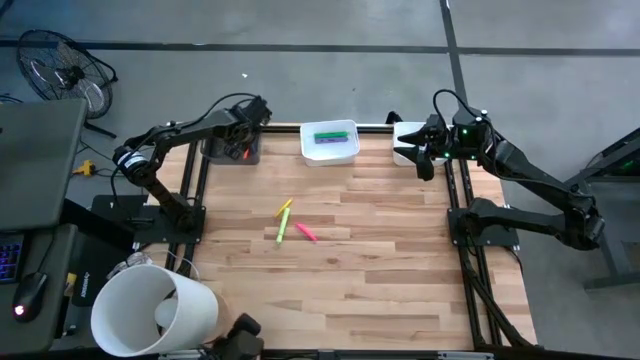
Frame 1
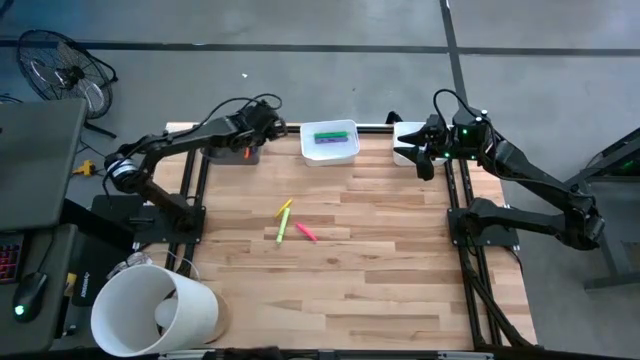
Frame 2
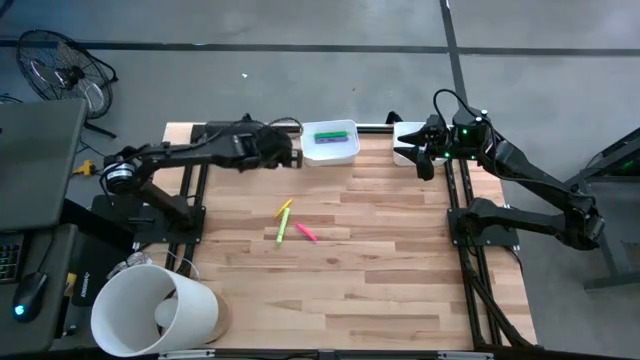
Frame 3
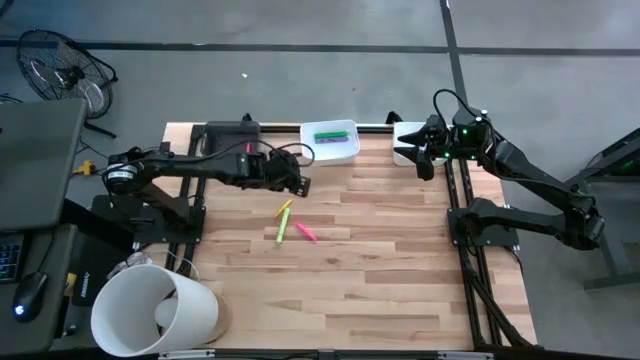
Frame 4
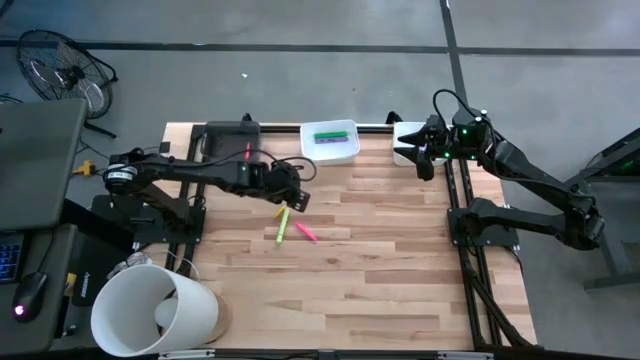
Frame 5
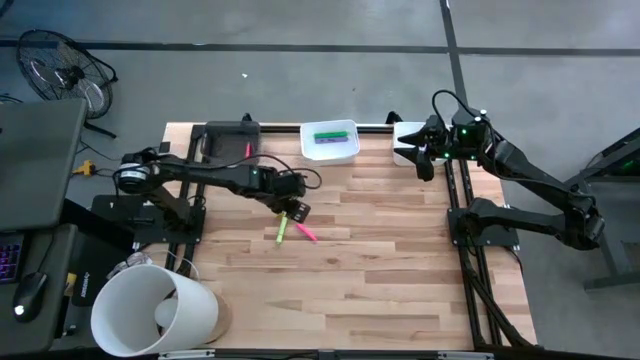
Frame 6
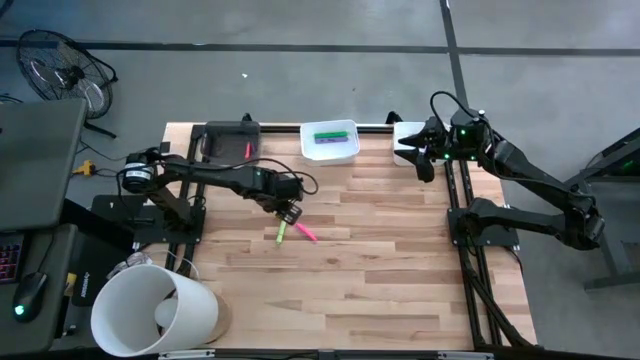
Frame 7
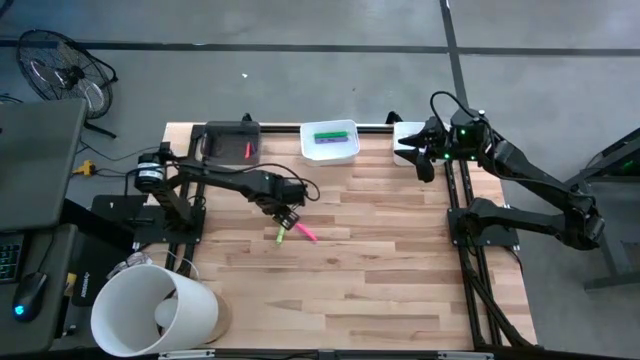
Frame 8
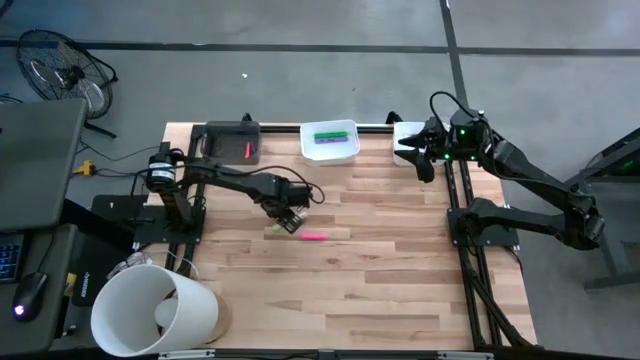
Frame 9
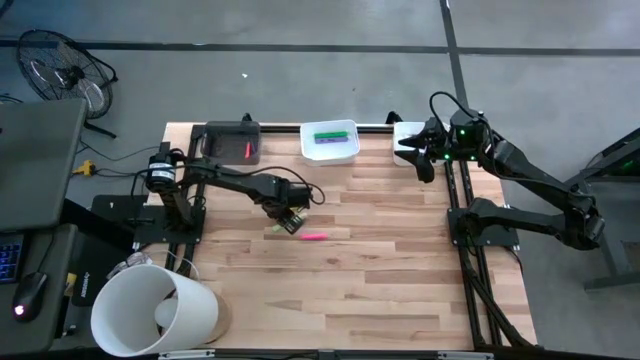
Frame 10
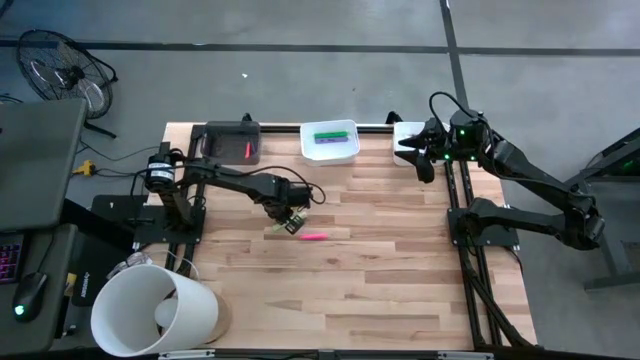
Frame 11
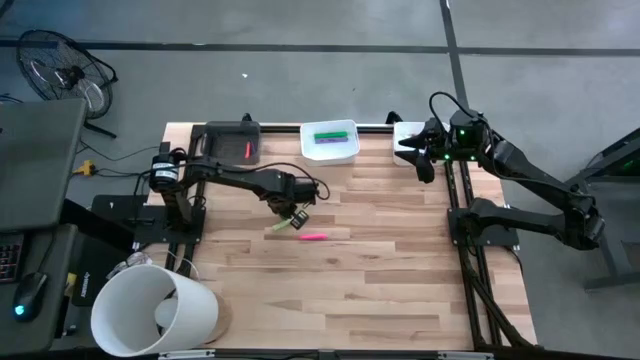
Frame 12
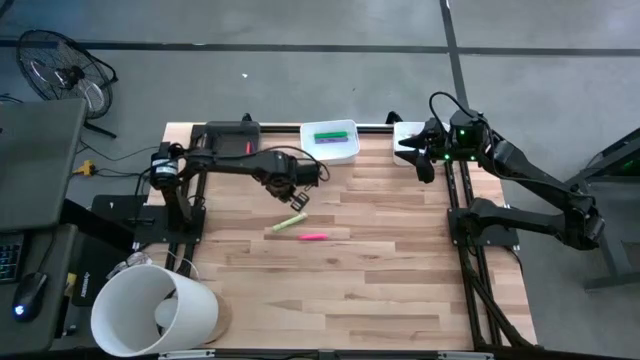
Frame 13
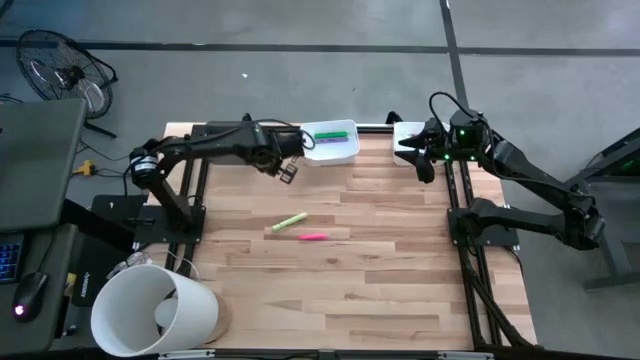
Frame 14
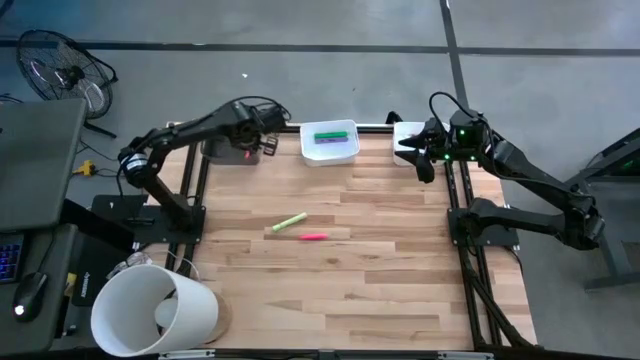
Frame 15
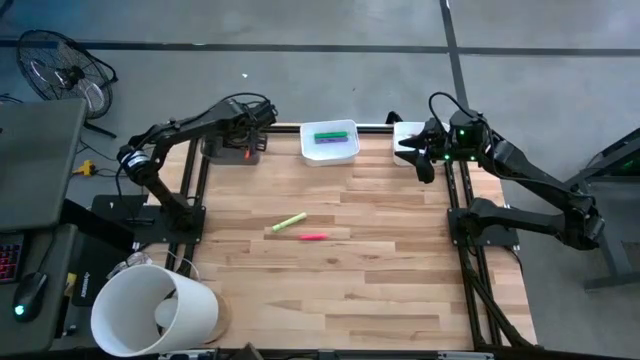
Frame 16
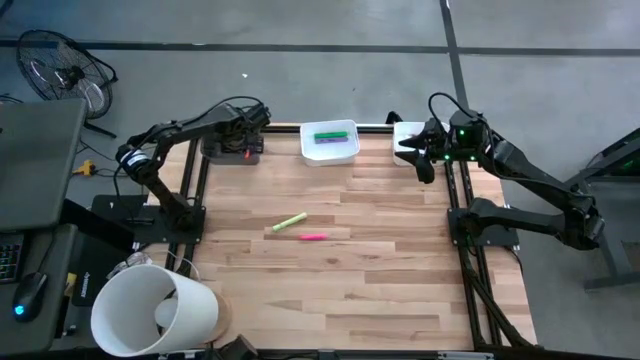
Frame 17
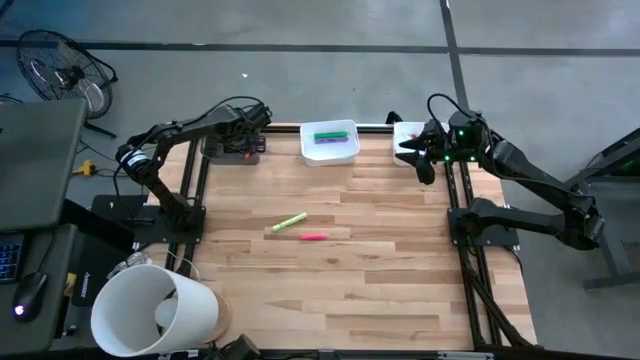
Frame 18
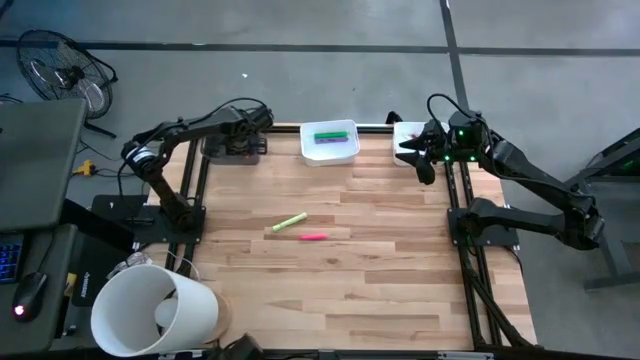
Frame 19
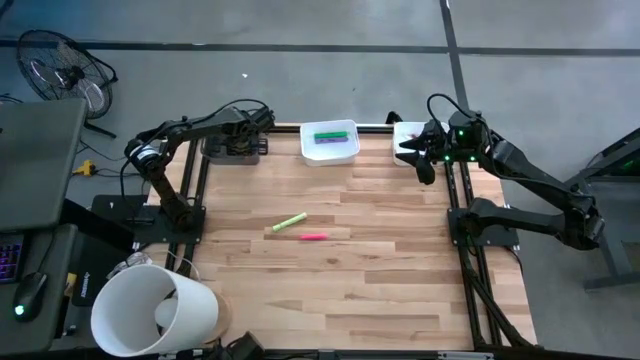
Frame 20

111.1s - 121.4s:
Task: Pick & Place Markers
Put the yellow pen into the black bin

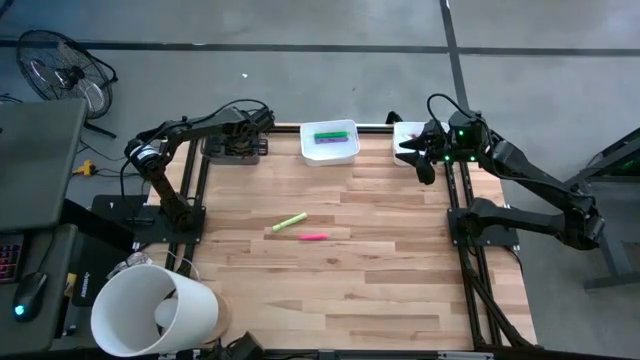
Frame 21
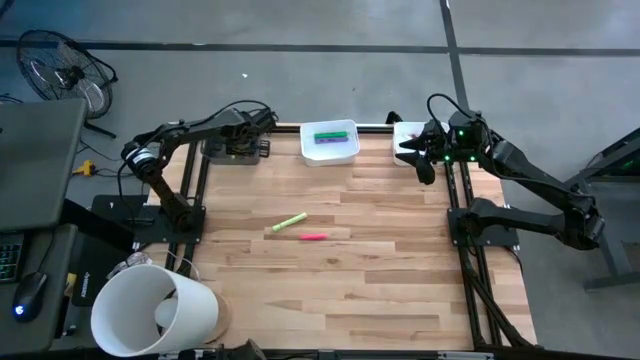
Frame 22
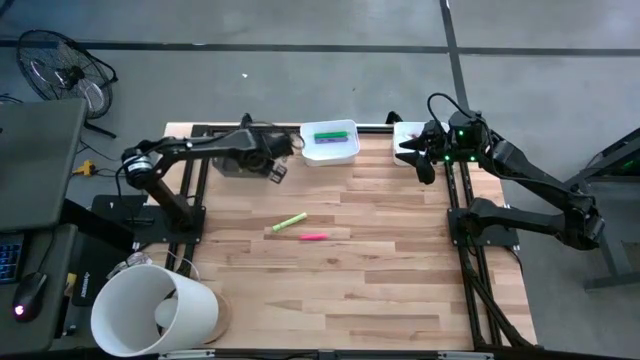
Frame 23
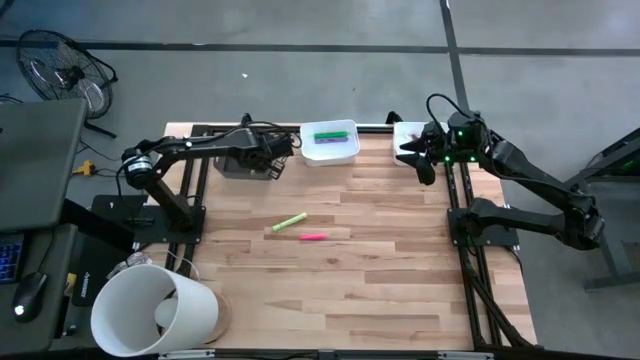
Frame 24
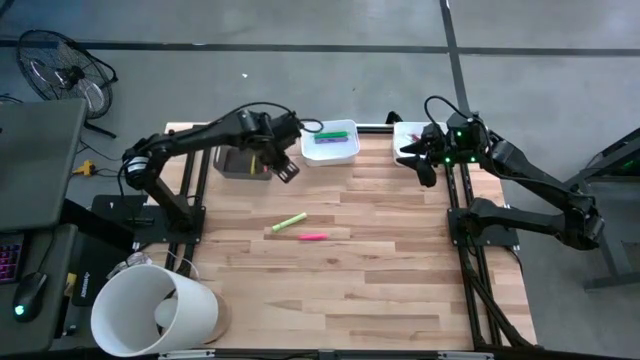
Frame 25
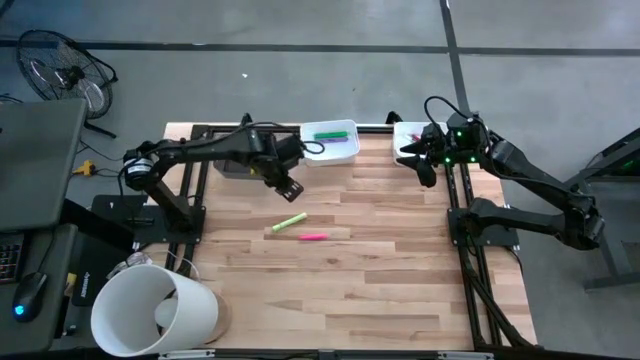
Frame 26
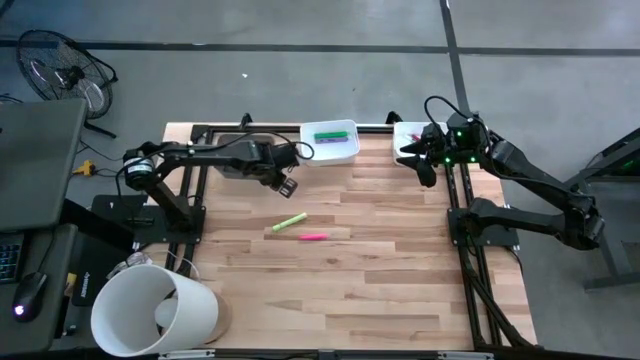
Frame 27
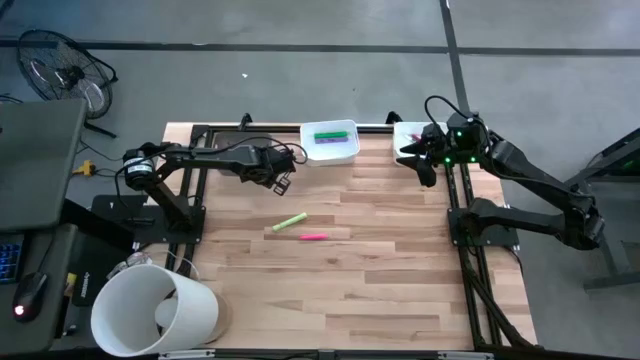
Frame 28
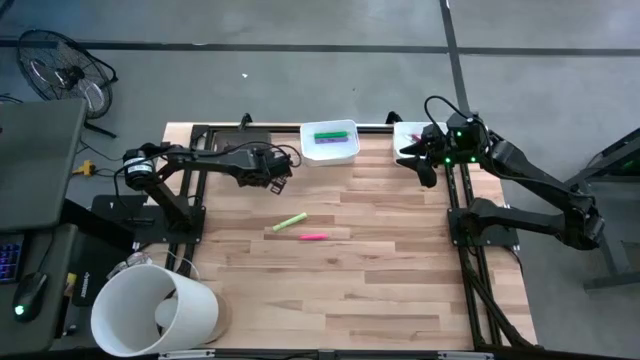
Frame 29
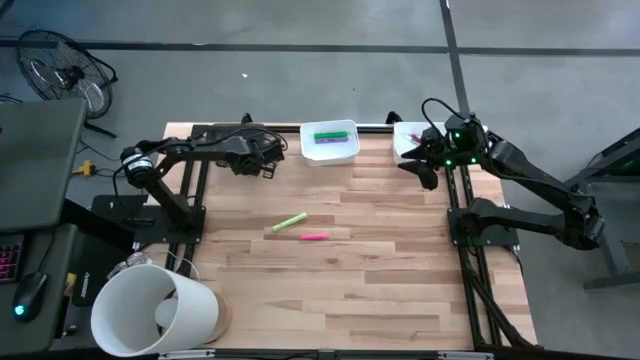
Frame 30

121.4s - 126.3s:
Adjust the black bin

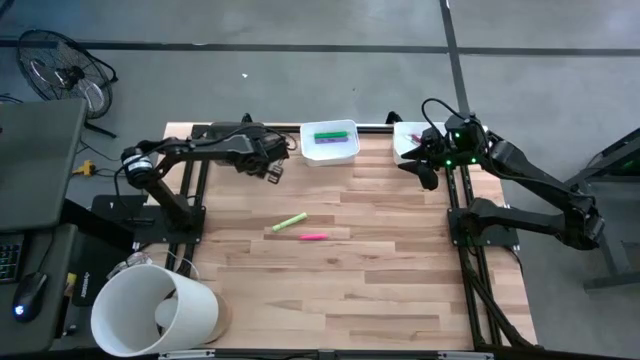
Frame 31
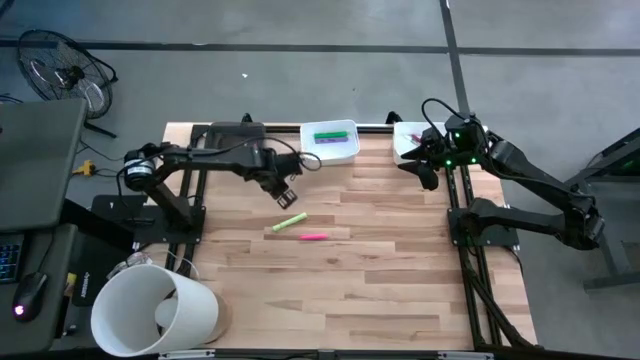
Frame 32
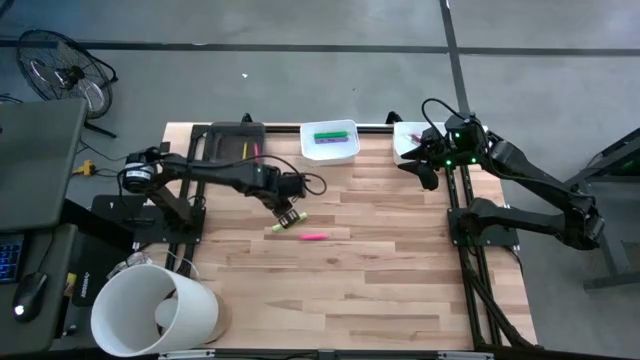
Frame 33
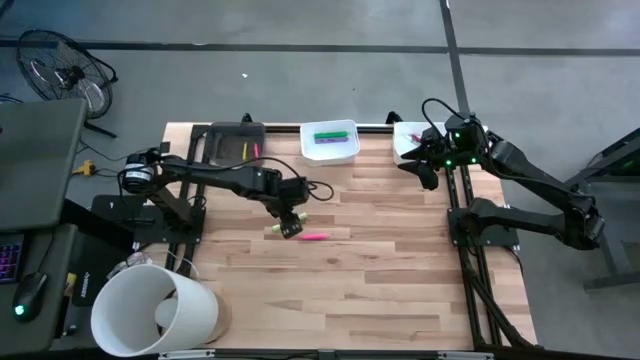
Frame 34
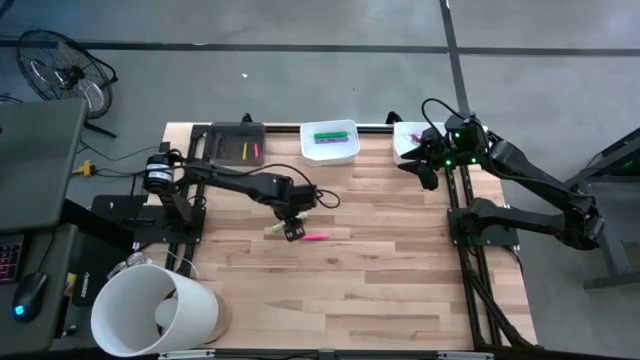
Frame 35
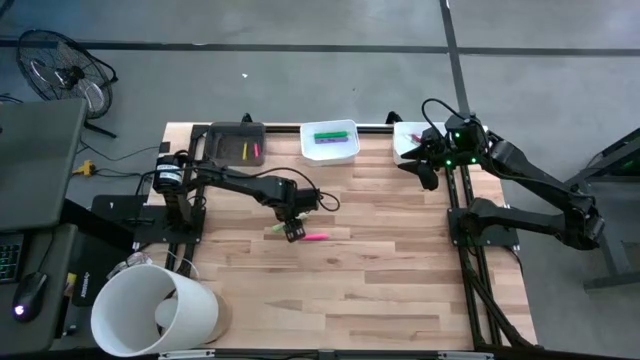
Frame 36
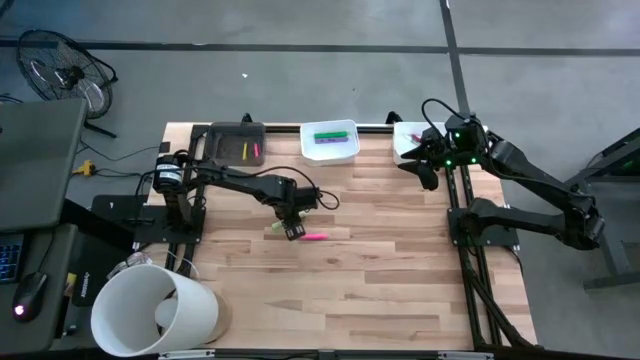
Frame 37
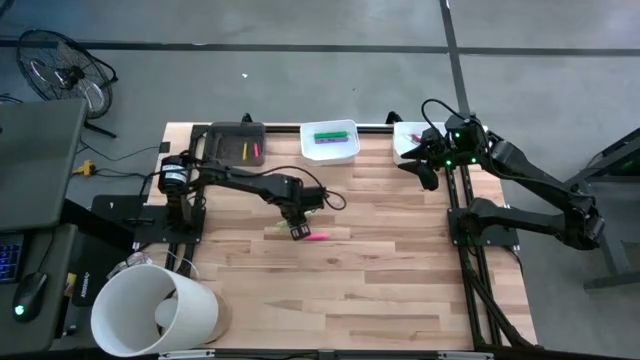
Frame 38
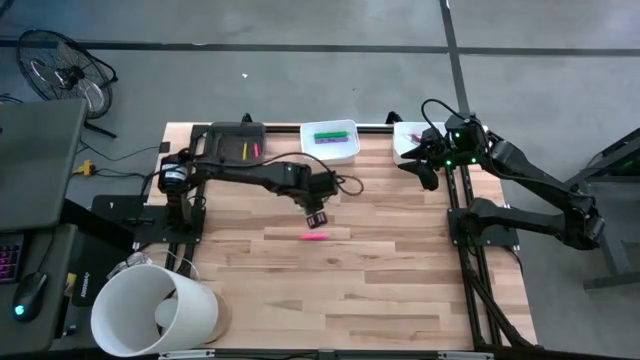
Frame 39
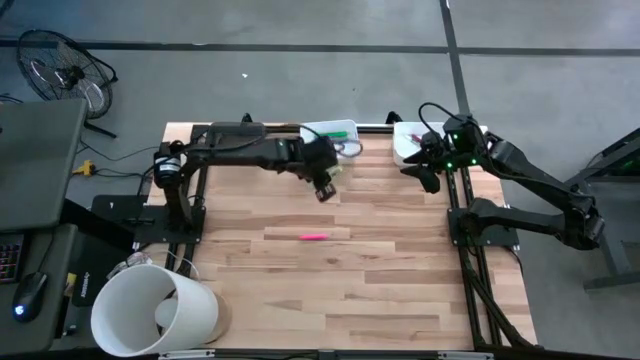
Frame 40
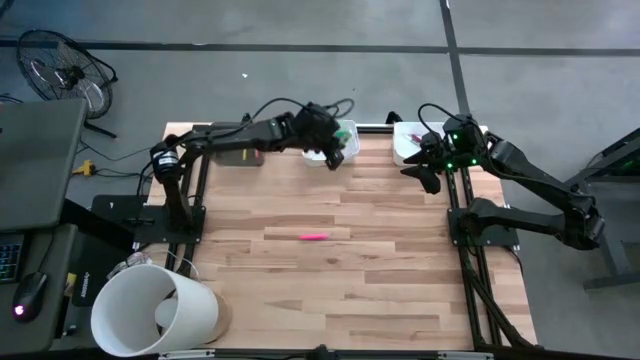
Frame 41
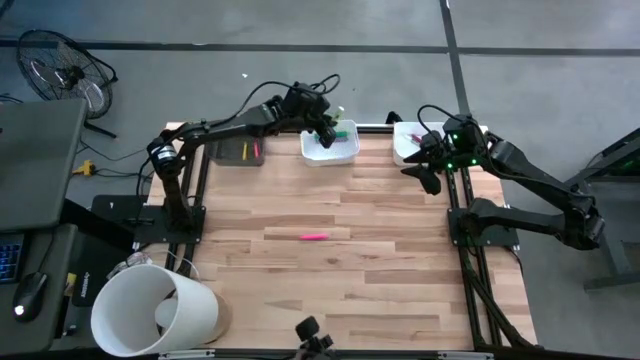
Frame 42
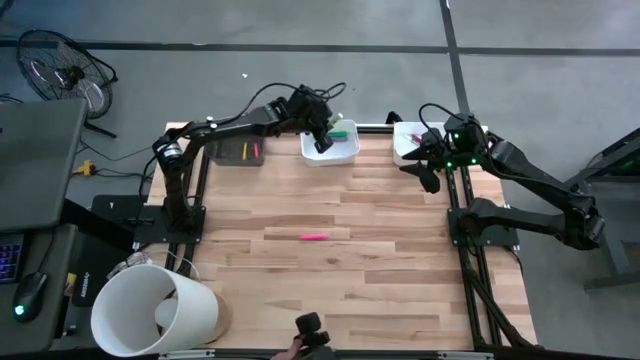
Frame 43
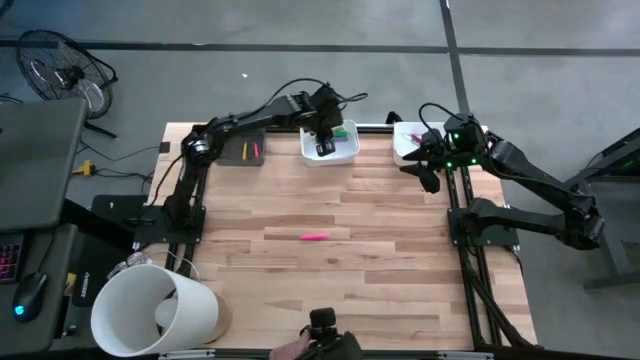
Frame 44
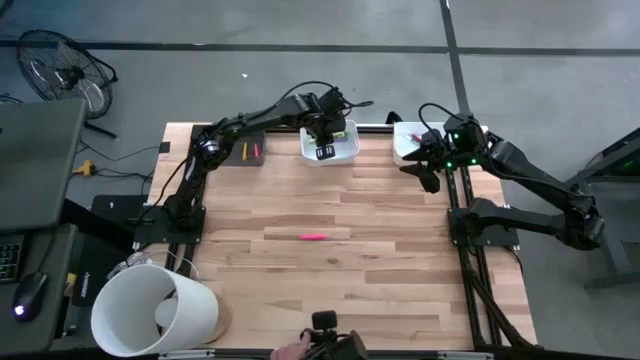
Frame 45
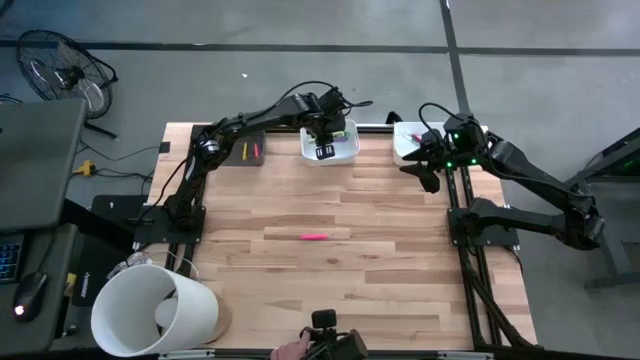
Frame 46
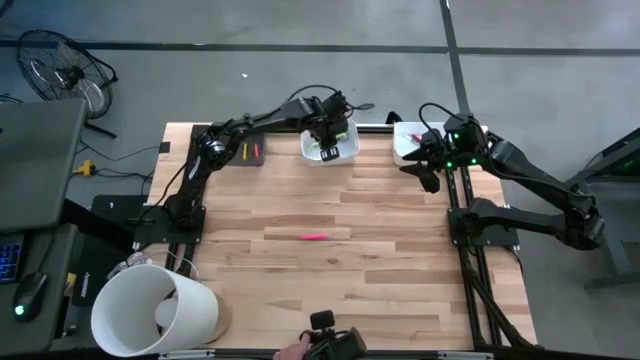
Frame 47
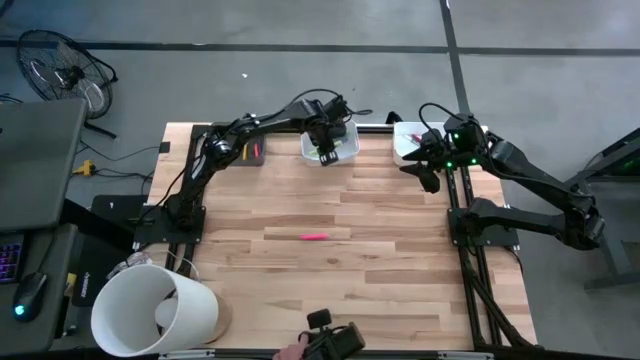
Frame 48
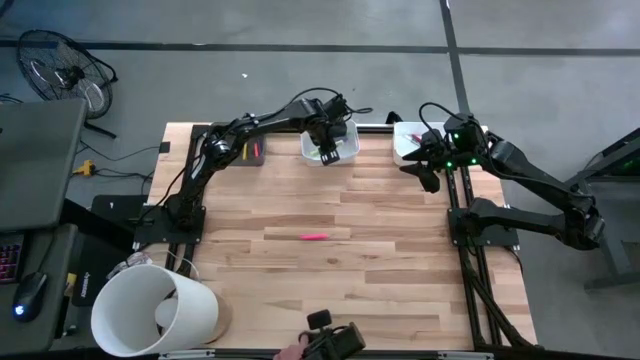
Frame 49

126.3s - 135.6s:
Put the light green highlighter pen into the left white bin
